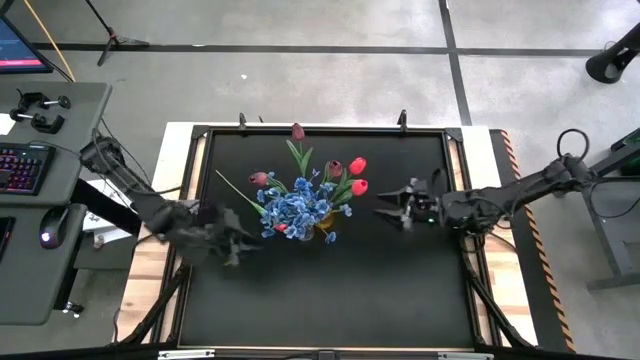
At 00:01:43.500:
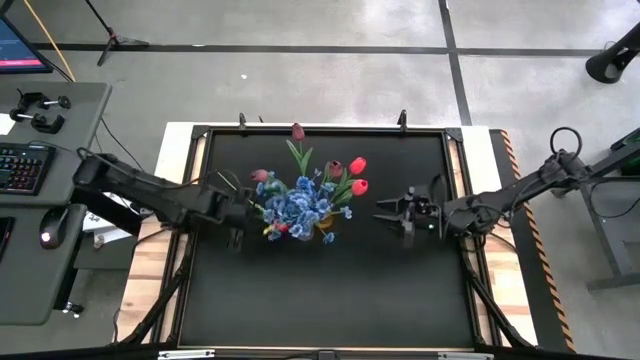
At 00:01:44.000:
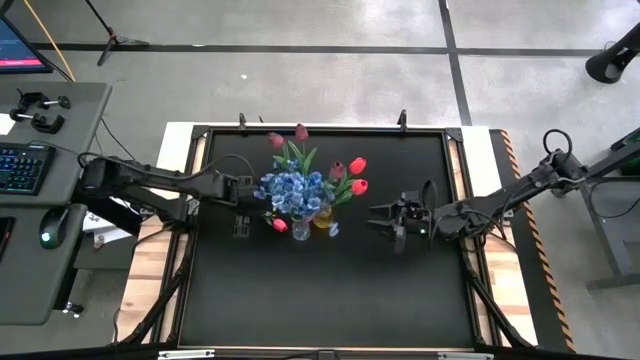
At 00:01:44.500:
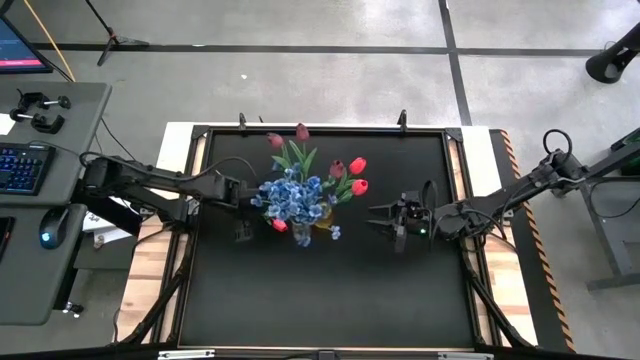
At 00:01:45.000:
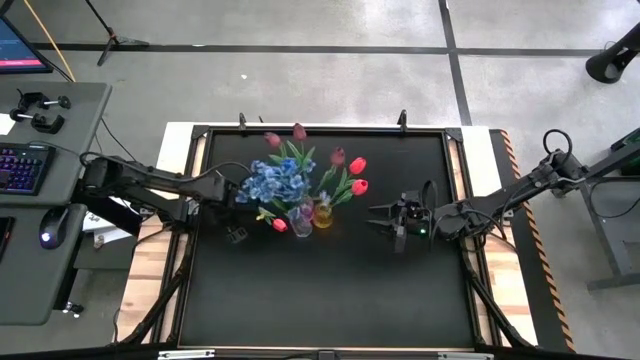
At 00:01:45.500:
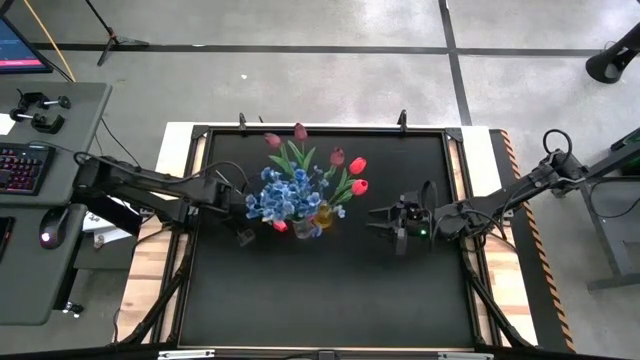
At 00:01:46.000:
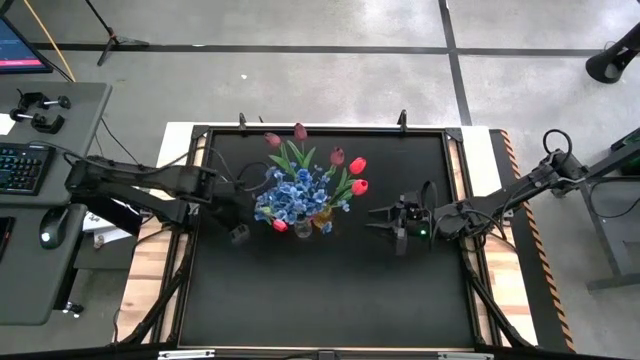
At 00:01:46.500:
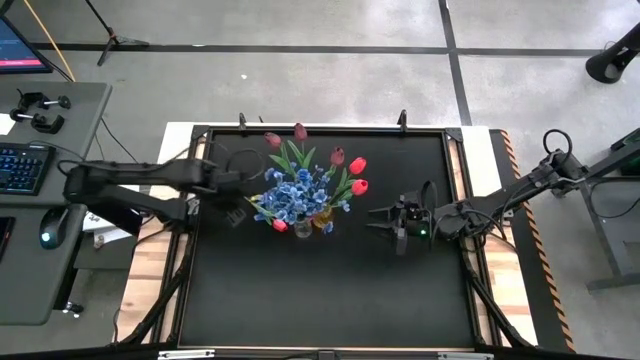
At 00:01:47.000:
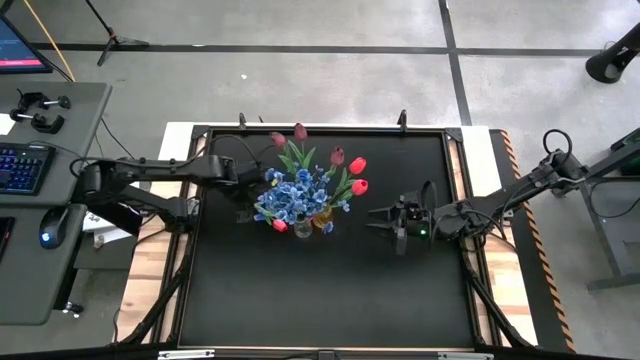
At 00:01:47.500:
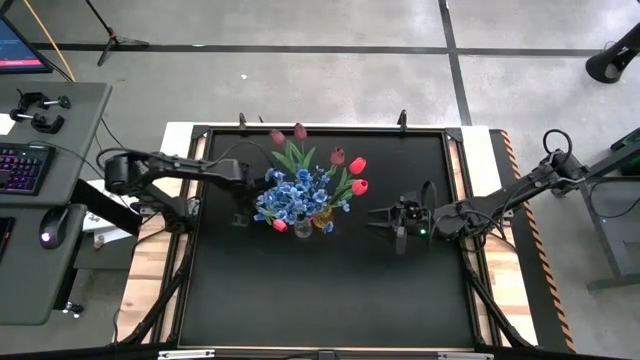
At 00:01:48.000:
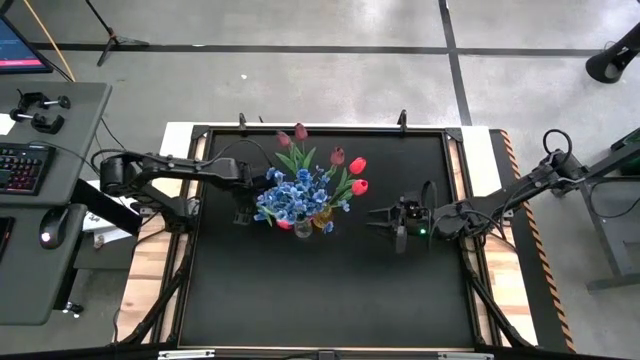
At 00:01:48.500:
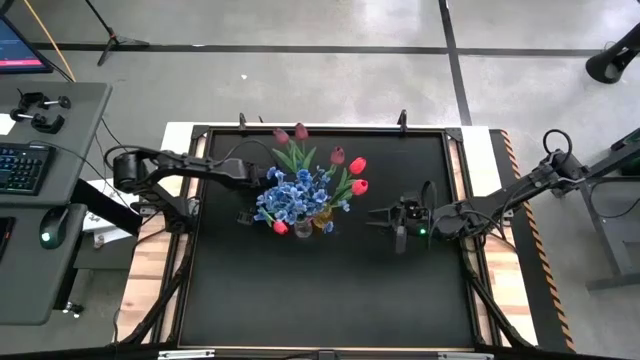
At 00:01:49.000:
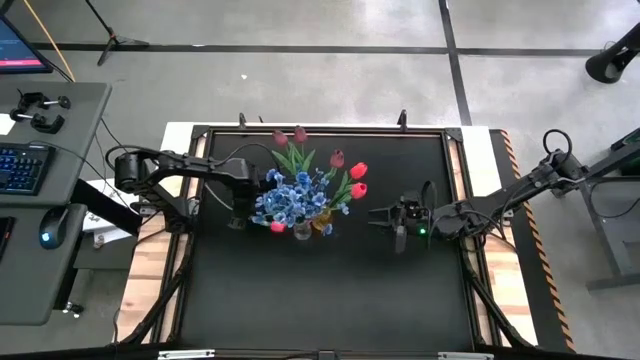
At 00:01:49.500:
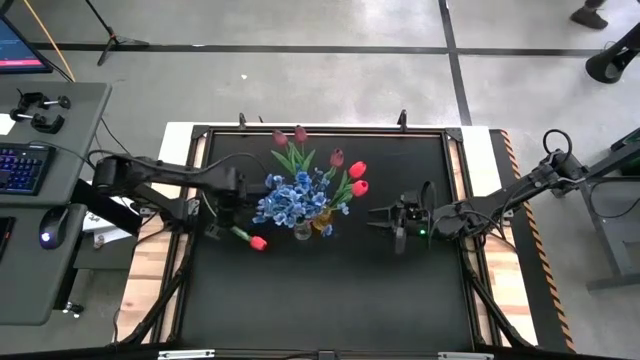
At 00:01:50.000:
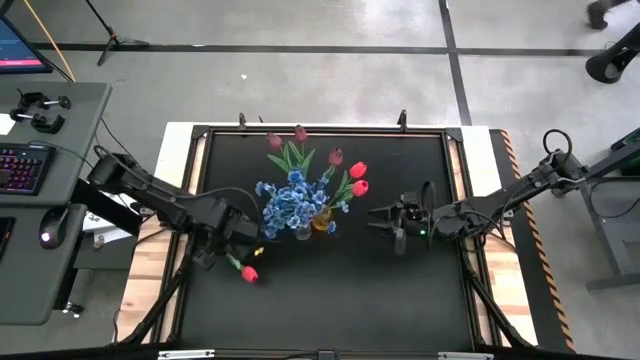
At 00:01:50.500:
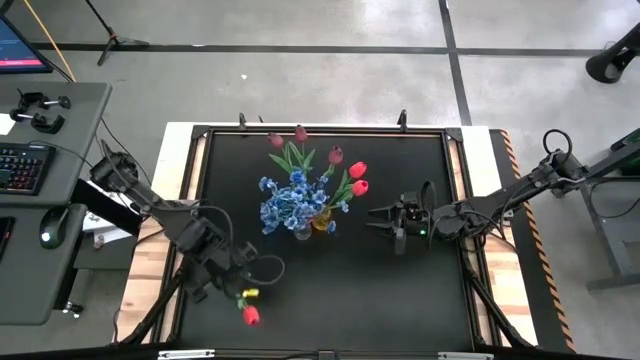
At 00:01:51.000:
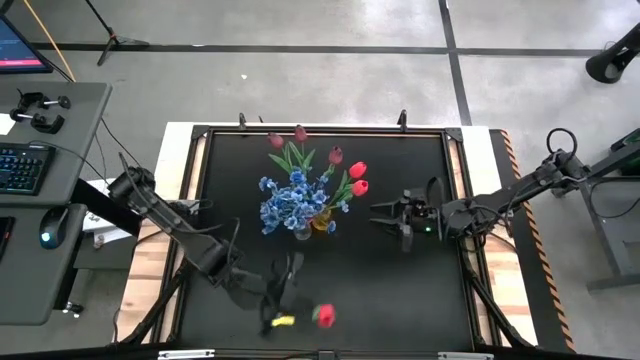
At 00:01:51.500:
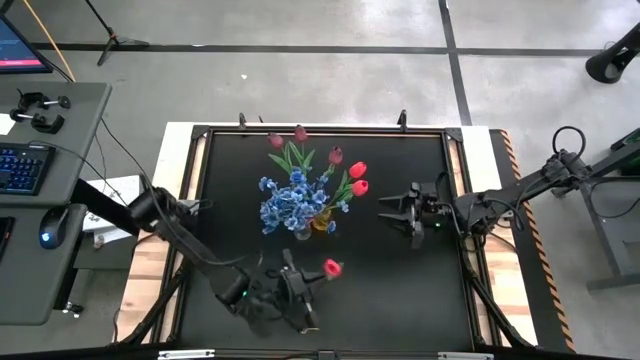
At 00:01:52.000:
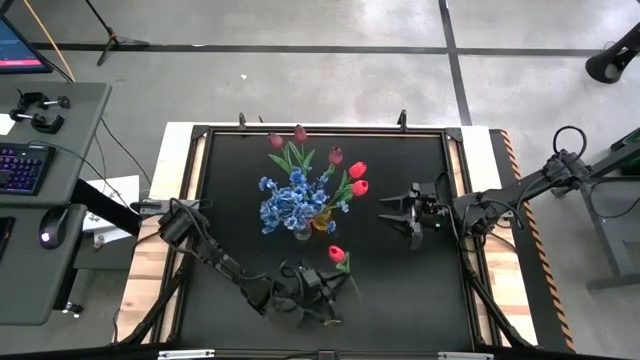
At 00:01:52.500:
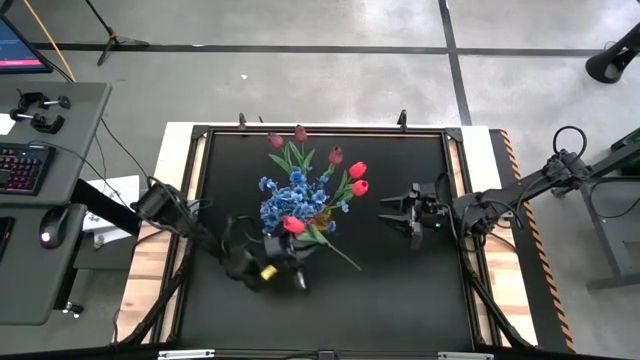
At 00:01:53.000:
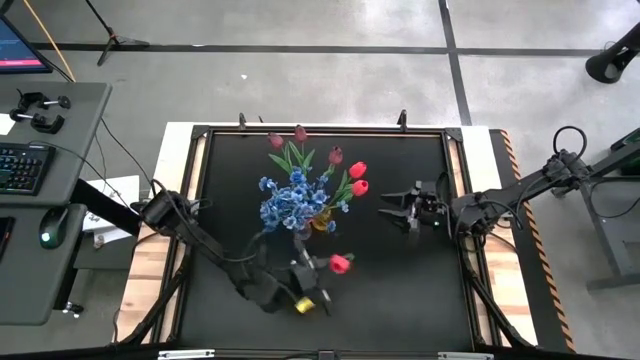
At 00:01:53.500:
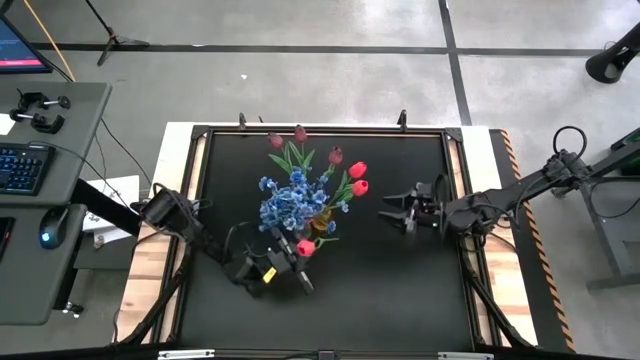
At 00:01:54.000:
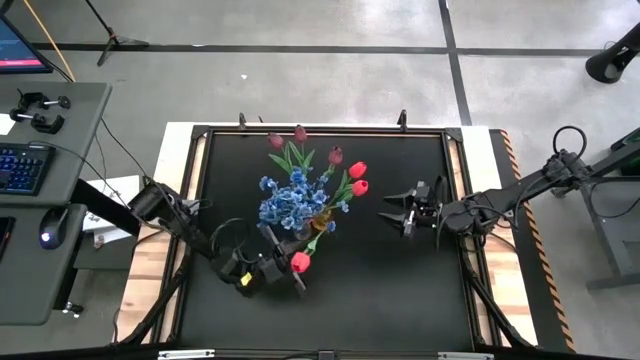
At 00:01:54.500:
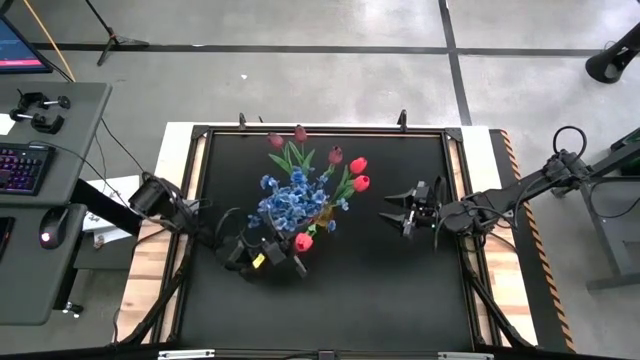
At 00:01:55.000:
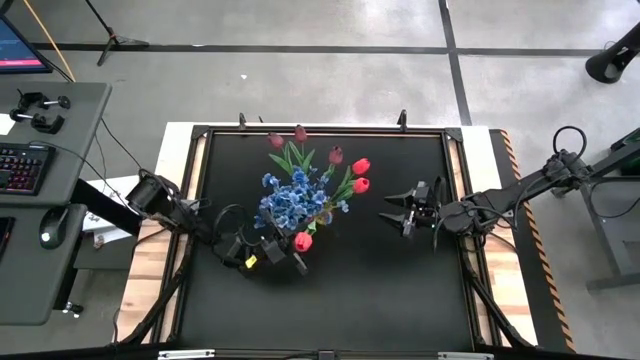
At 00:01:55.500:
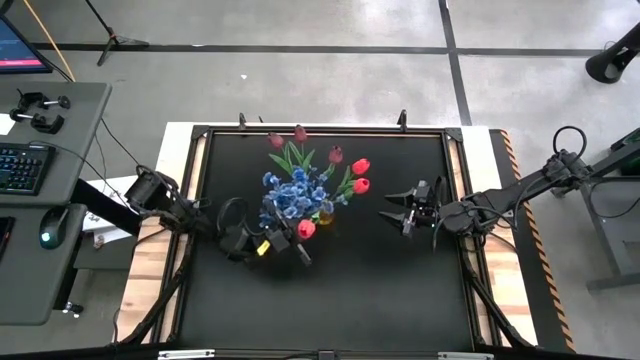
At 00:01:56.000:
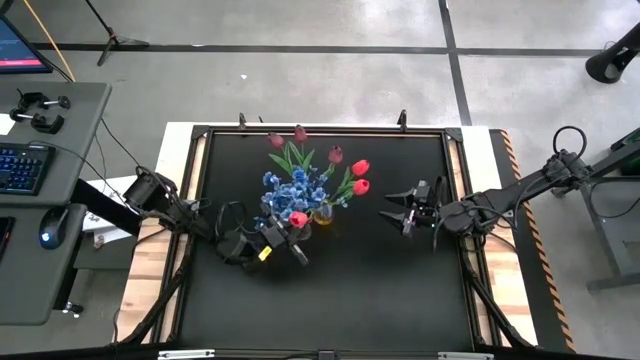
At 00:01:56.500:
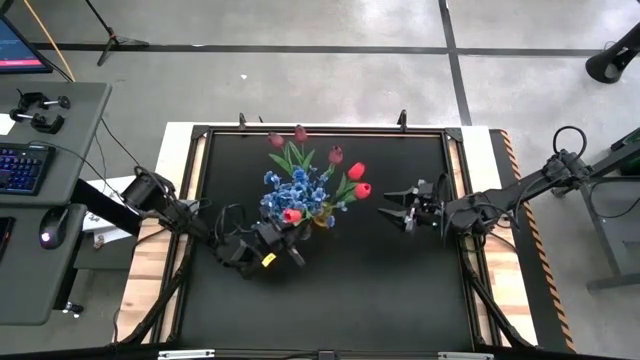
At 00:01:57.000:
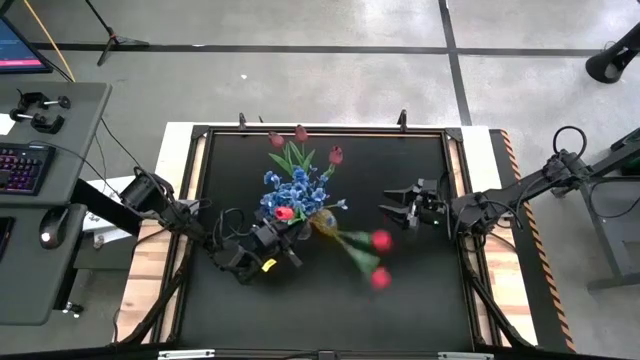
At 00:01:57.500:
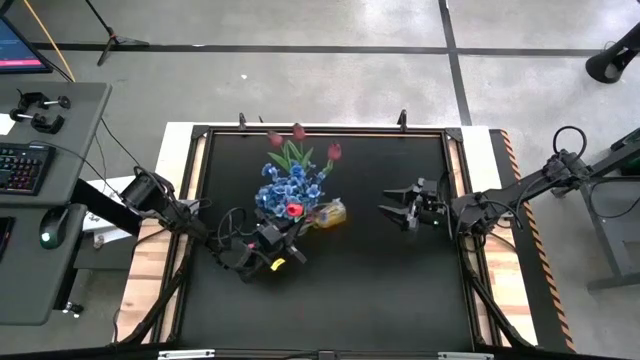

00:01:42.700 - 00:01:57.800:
Task: Sort flowers into vase by color
Put the red flower into the yellow vase
